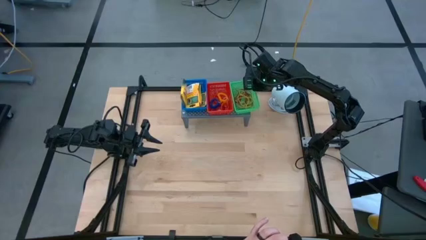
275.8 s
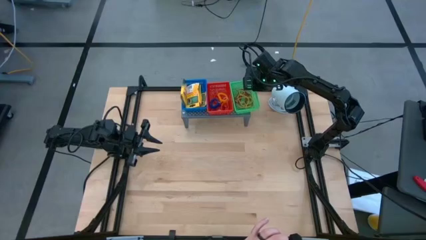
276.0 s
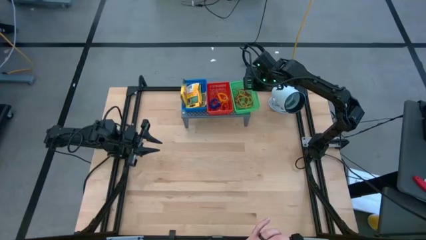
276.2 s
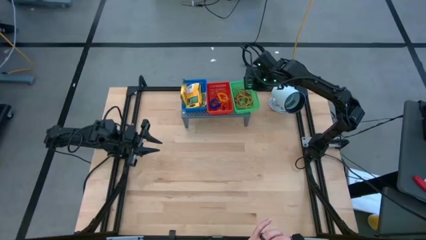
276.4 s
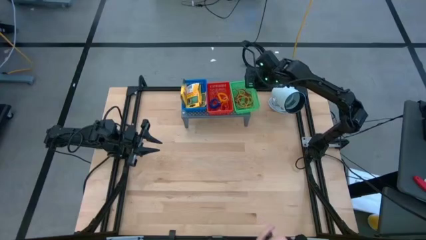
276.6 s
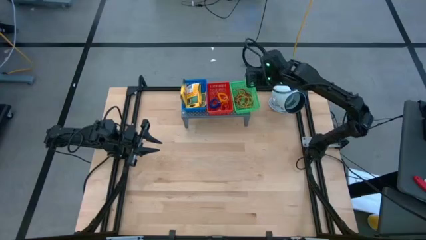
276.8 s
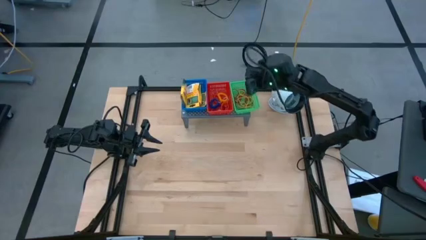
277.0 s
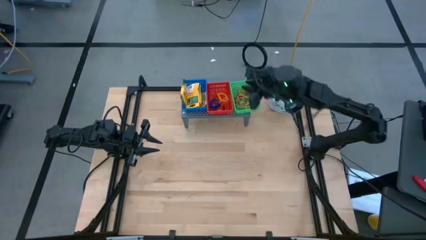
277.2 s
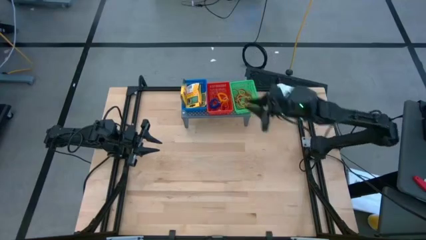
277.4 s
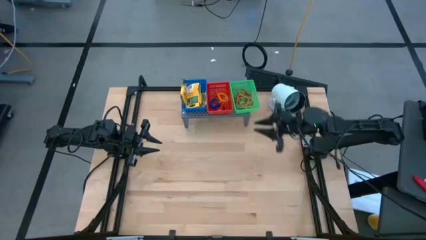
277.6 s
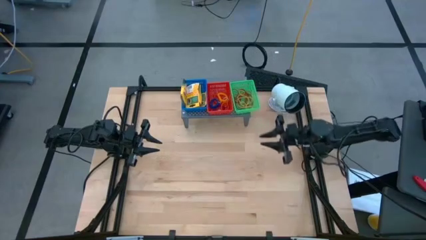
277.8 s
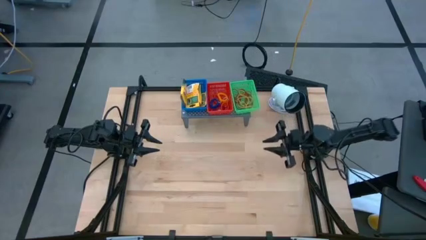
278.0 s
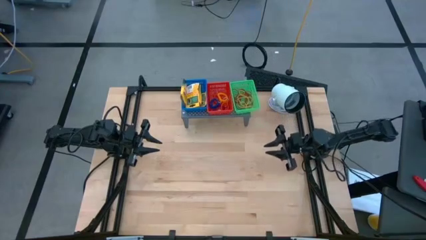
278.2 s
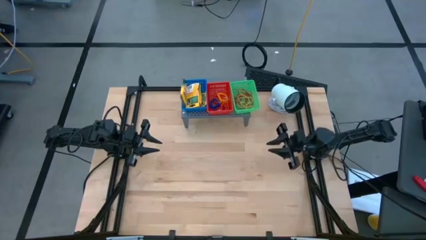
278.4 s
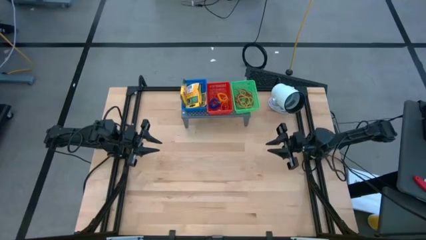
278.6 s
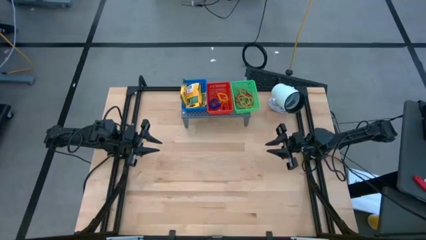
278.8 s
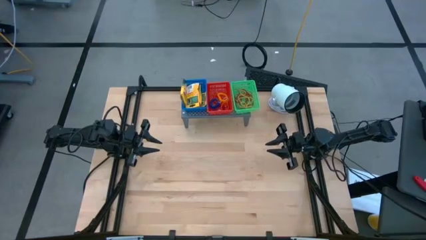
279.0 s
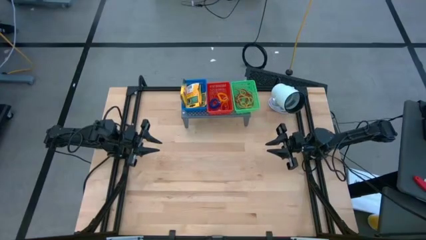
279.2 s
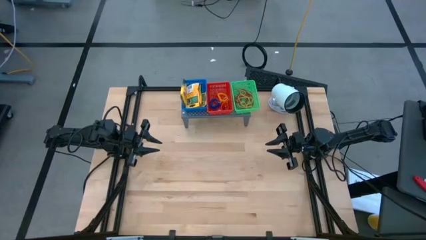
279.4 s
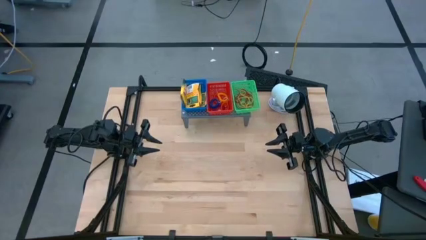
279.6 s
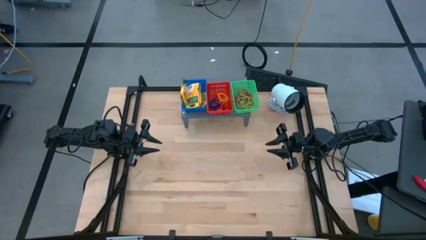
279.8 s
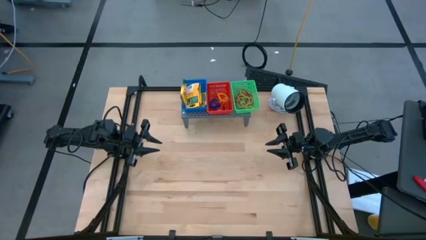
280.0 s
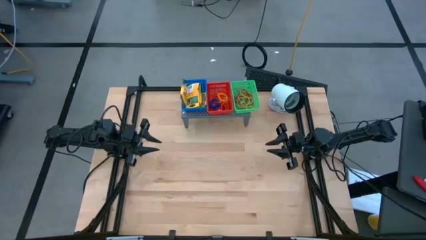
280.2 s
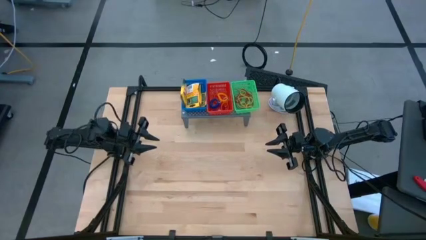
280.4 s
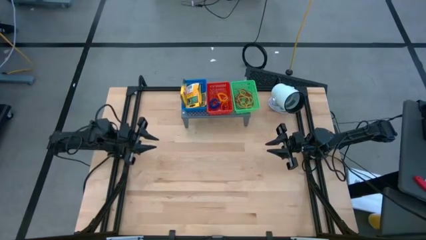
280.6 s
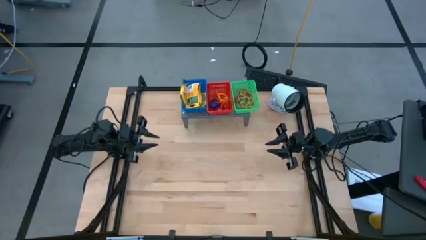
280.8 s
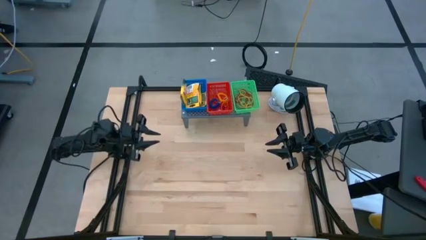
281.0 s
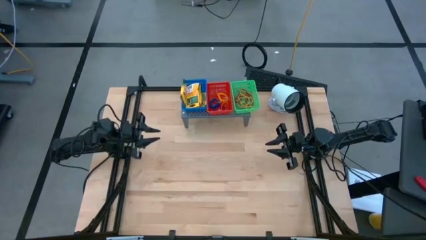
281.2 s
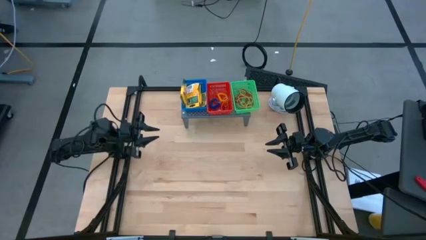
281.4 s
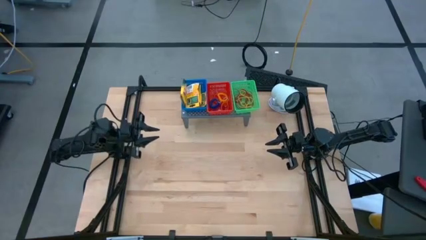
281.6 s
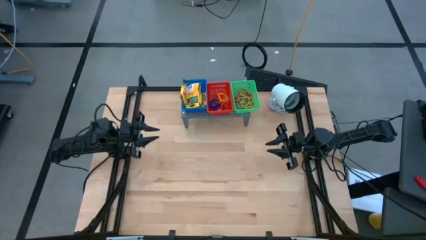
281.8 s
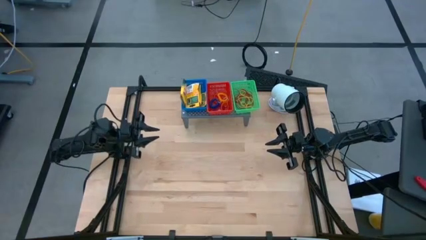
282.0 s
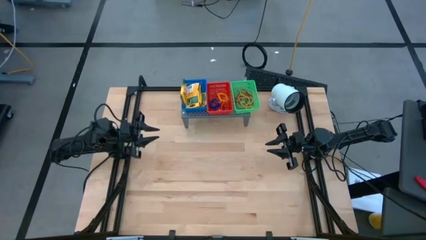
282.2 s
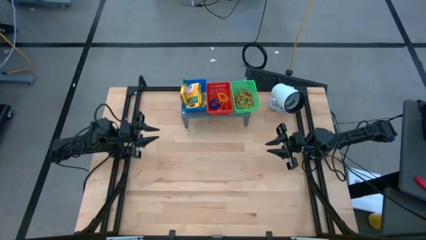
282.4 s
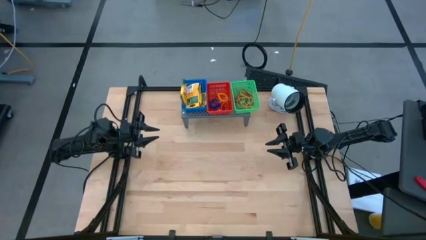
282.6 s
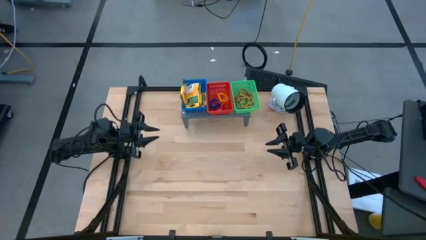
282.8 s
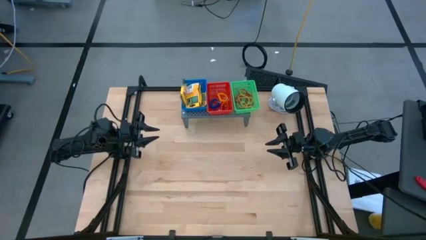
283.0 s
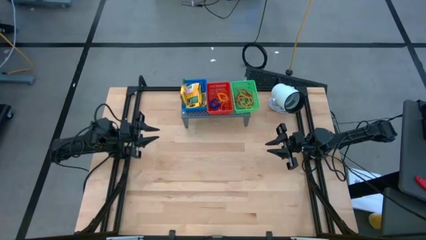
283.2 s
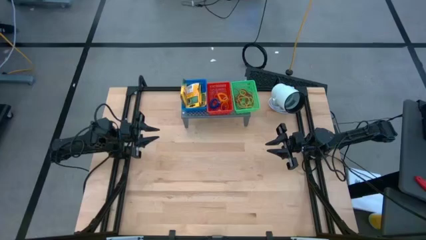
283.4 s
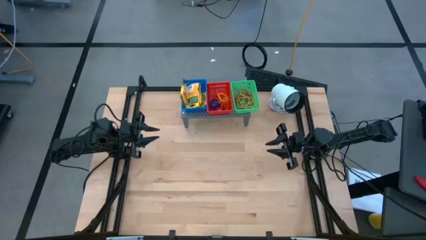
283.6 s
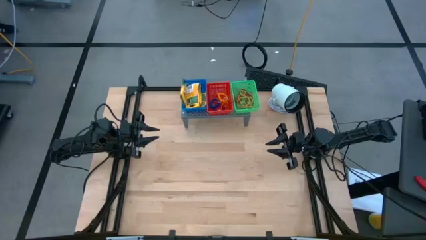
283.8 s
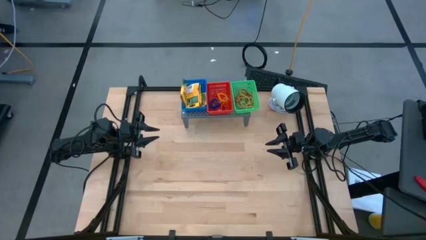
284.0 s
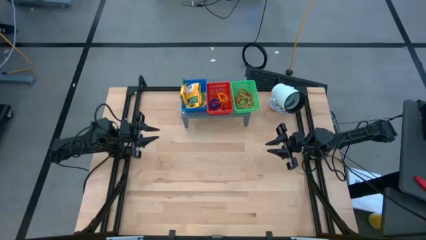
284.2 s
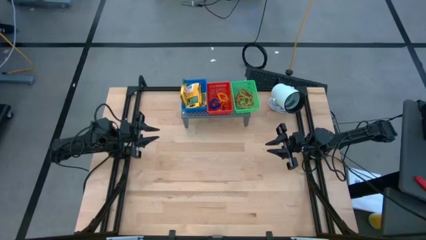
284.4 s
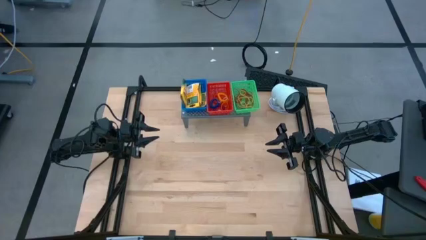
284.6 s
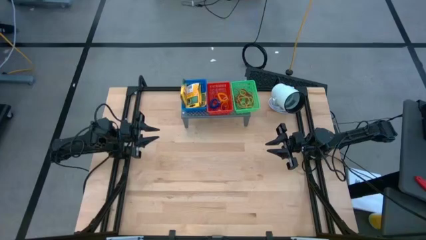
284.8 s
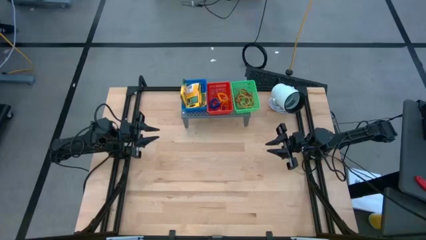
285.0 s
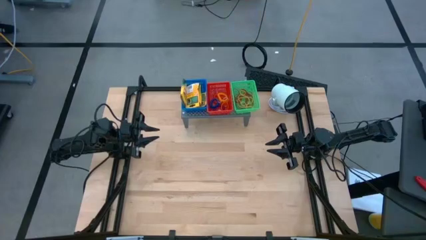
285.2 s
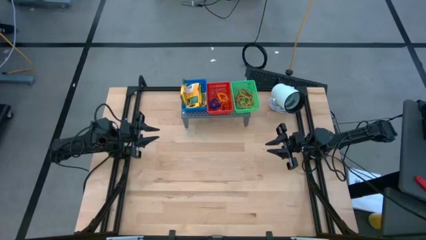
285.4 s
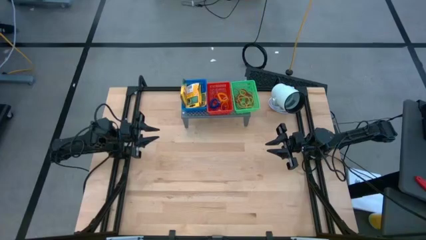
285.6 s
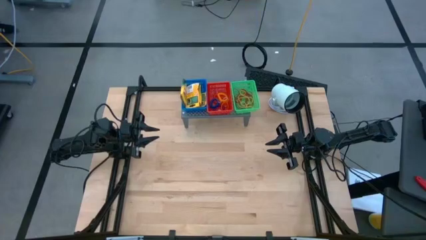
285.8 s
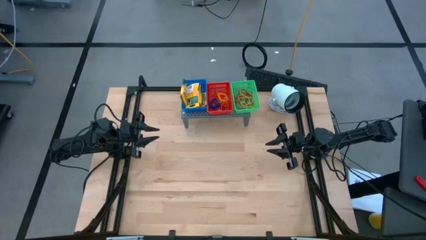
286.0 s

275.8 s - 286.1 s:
Task: Pick & Place Office Desk Supplies
Return to Home Position

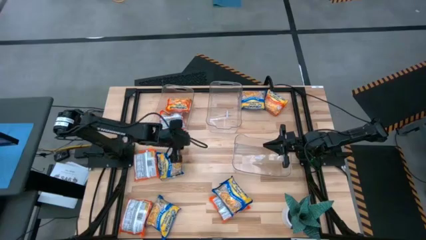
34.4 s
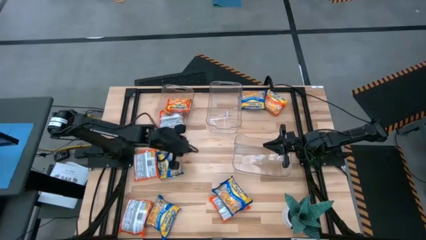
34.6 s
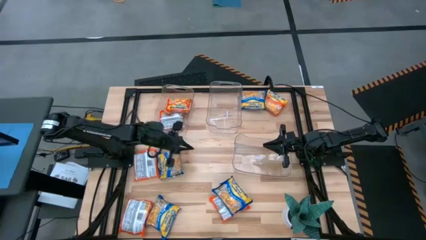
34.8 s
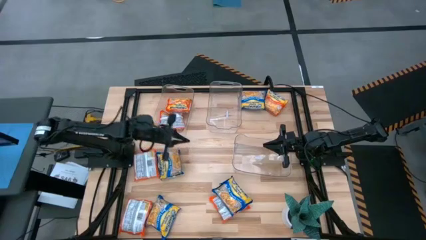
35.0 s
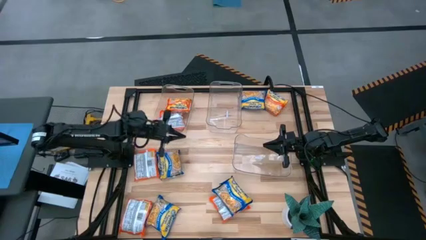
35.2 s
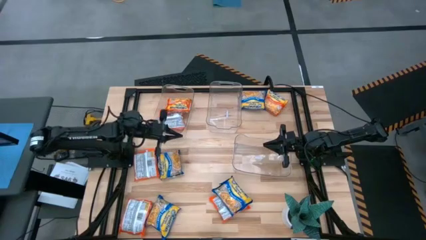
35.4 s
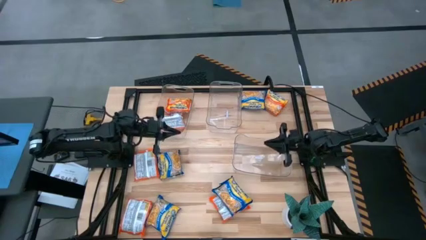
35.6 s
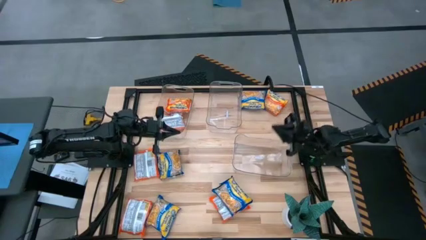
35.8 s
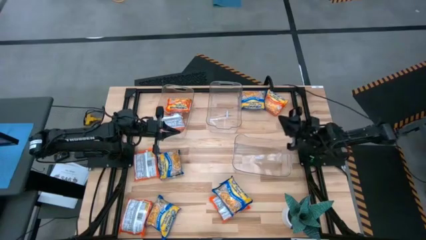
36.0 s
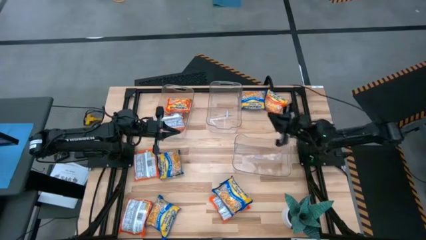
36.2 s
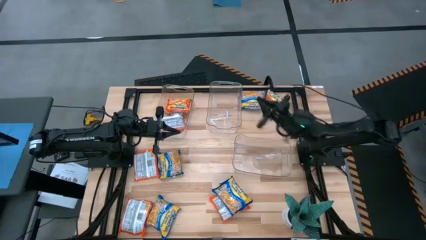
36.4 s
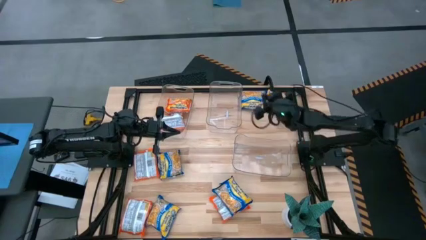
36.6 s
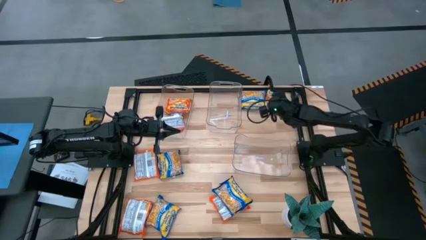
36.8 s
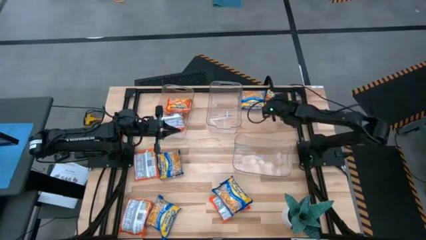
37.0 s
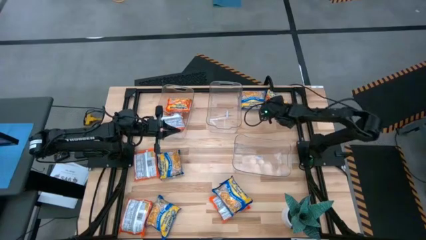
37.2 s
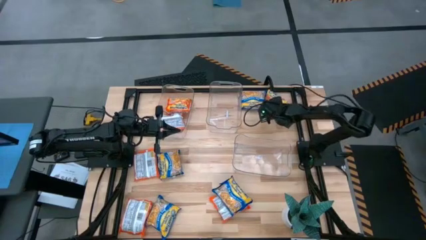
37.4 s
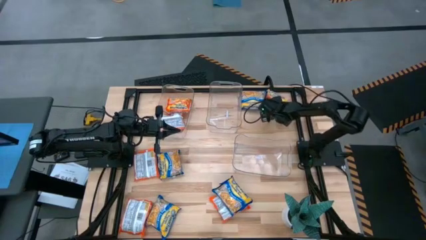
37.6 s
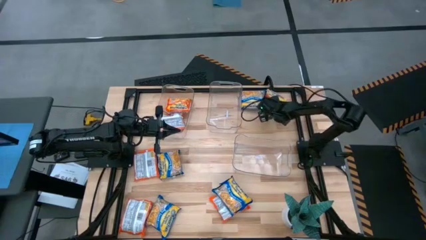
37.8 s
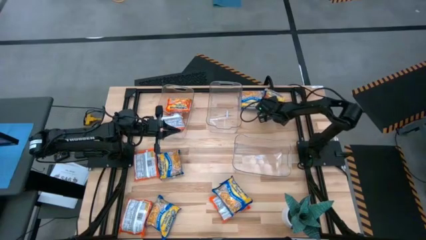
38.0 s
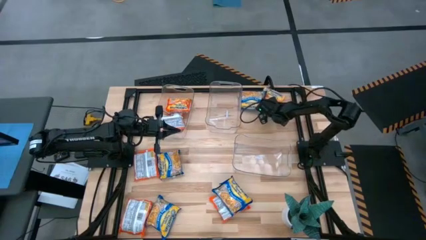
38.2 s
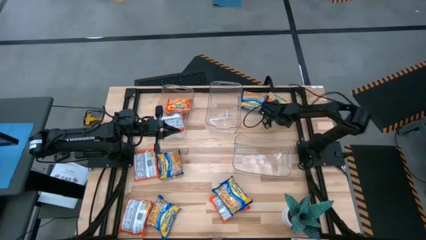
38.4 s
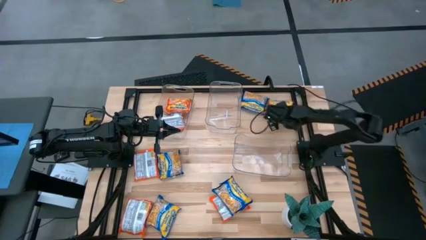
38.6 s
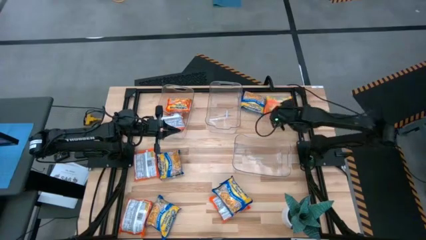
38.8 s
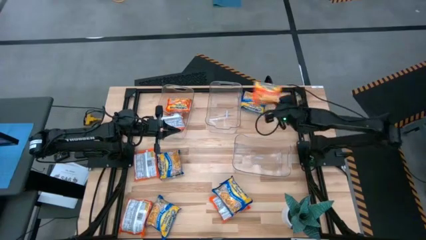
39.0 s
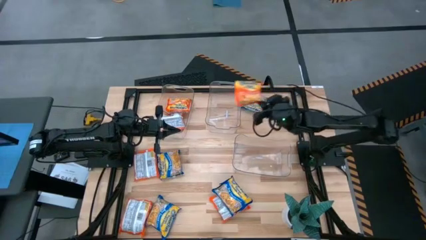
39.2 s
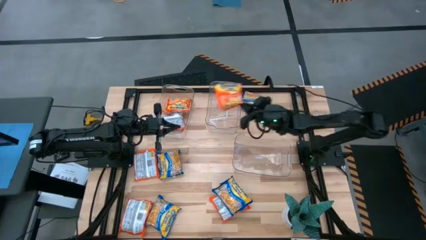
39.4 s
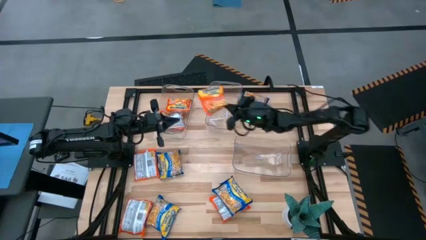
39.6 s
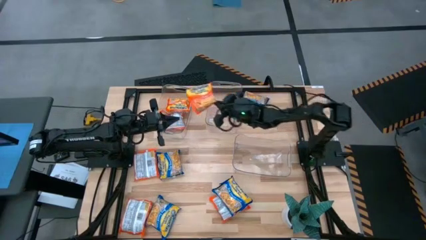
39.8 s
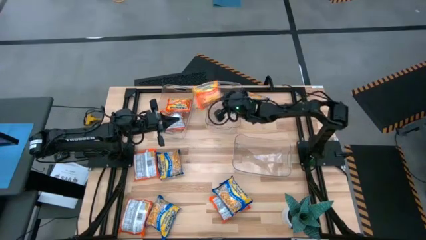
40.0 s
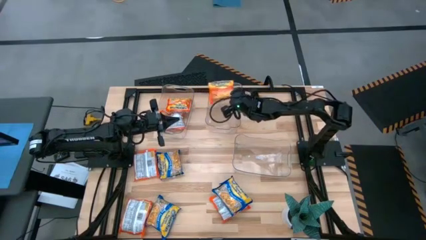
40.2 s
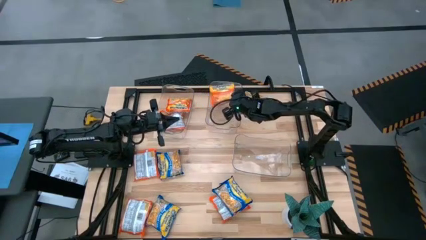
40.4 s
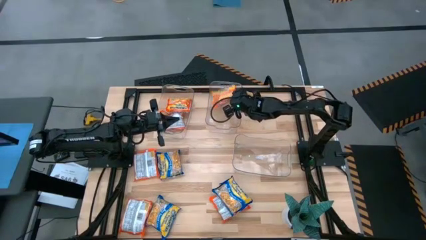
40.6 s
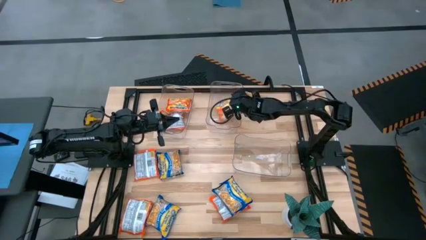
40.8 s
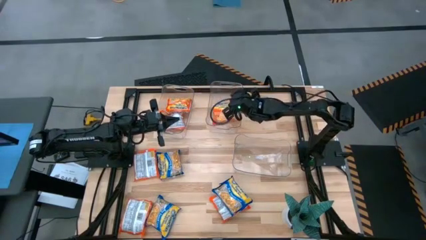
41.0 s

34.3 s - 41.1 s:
Task: Sort Maruchan noodles
Put the orange bag into the top right transparent bin
